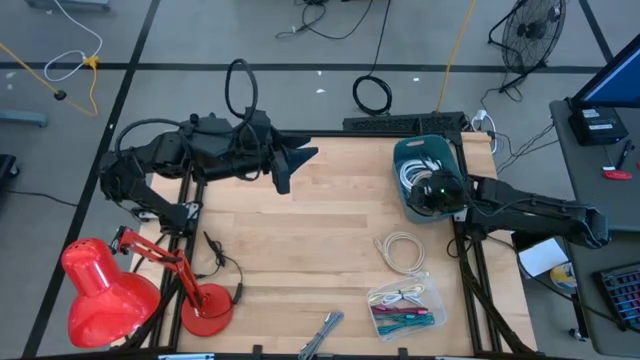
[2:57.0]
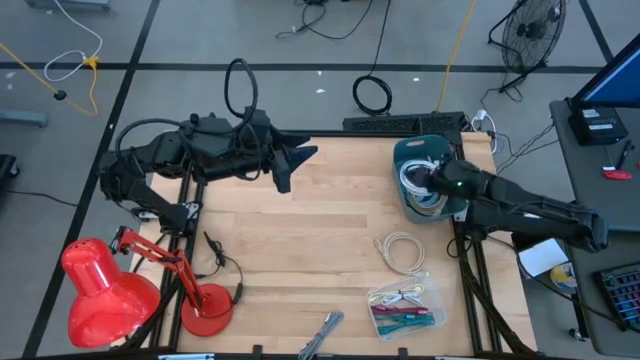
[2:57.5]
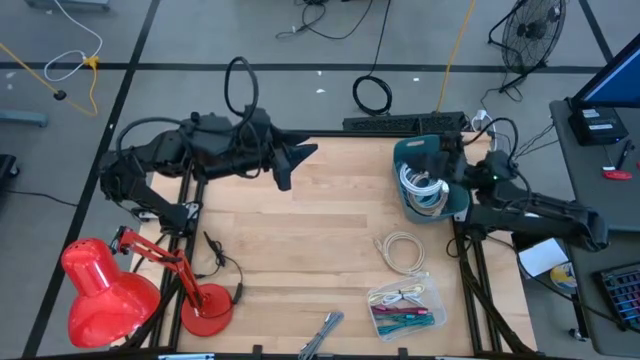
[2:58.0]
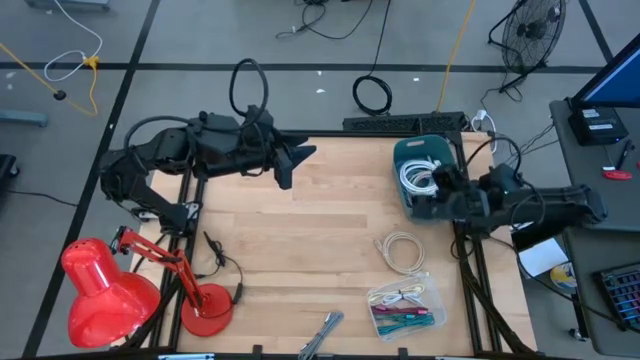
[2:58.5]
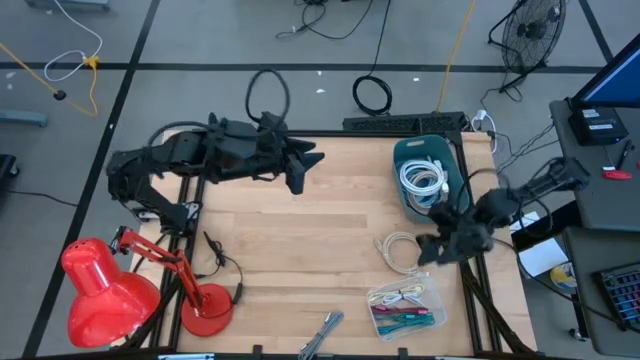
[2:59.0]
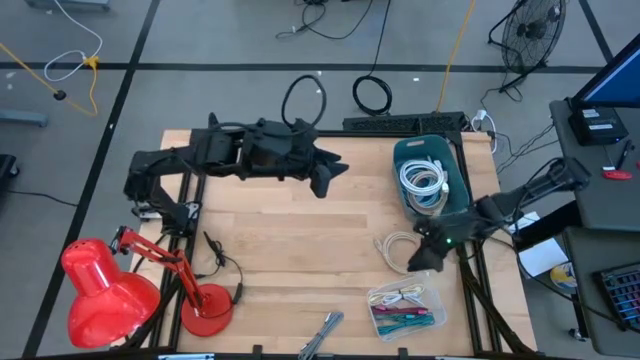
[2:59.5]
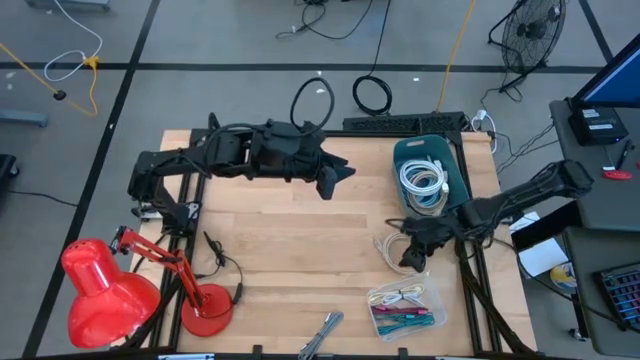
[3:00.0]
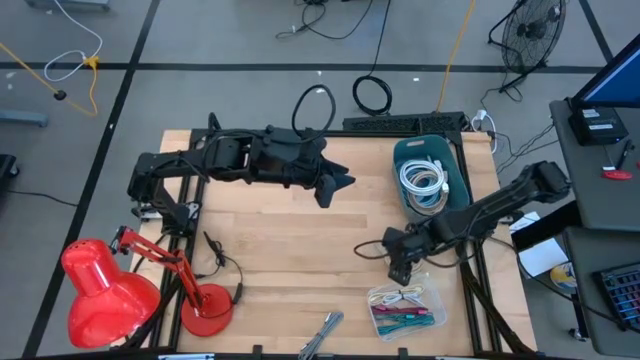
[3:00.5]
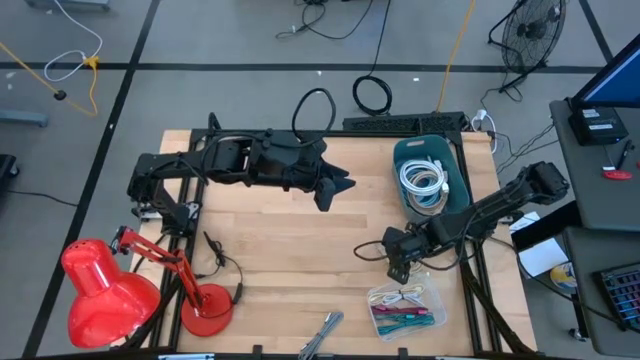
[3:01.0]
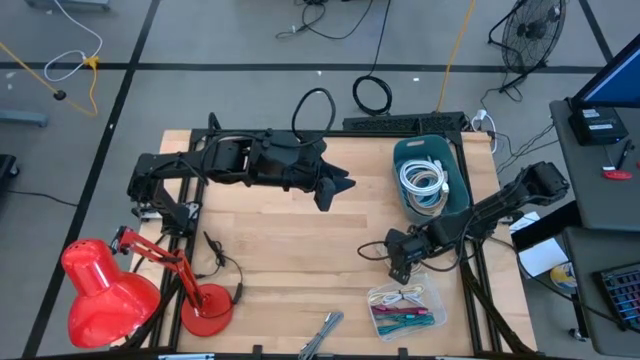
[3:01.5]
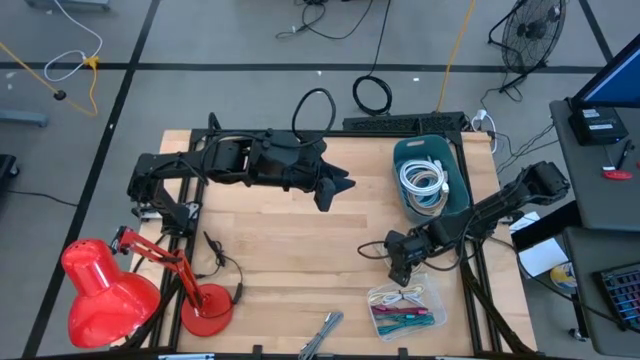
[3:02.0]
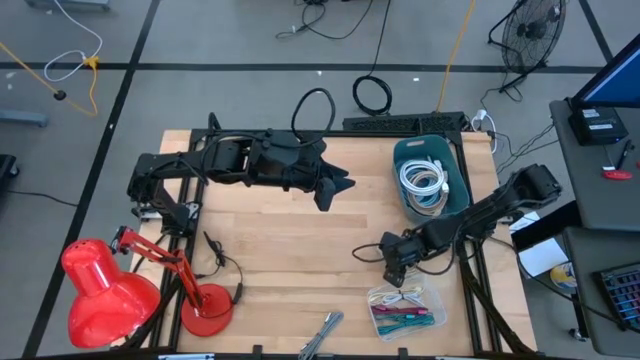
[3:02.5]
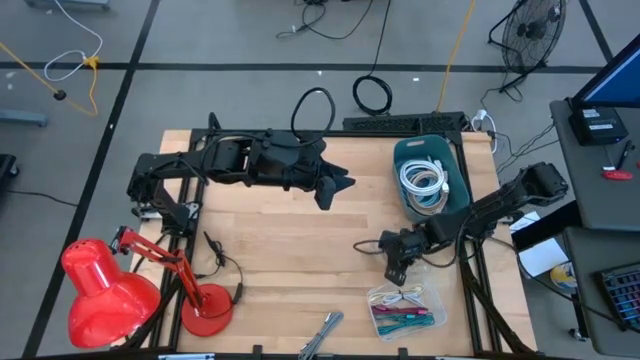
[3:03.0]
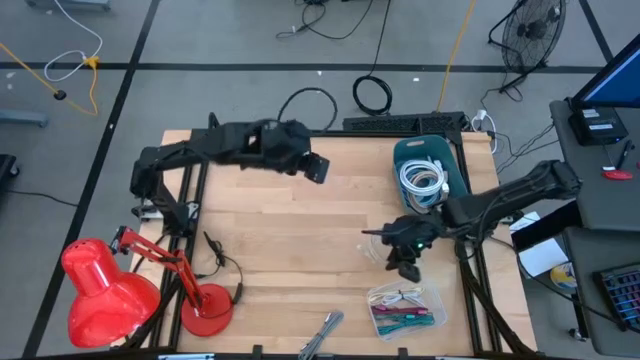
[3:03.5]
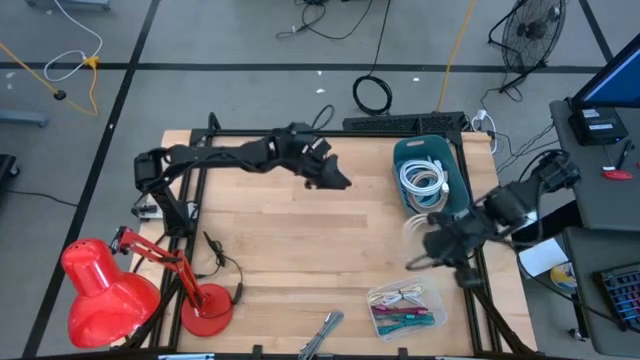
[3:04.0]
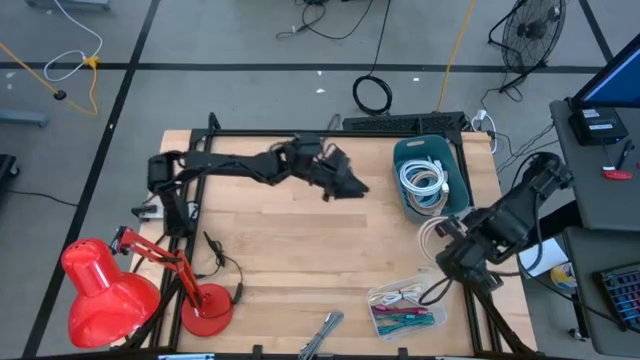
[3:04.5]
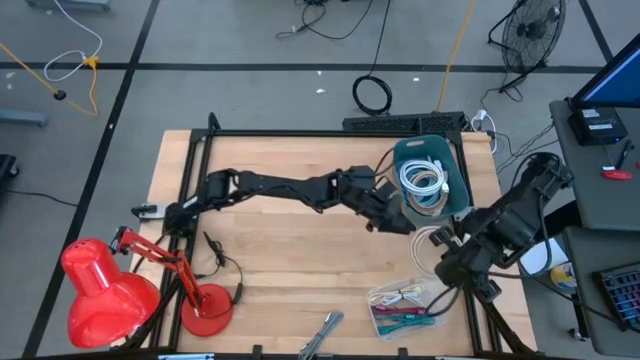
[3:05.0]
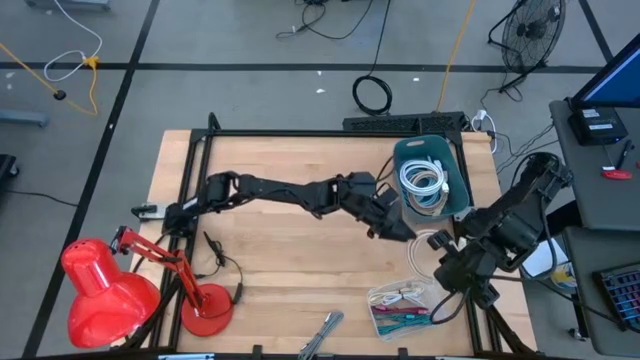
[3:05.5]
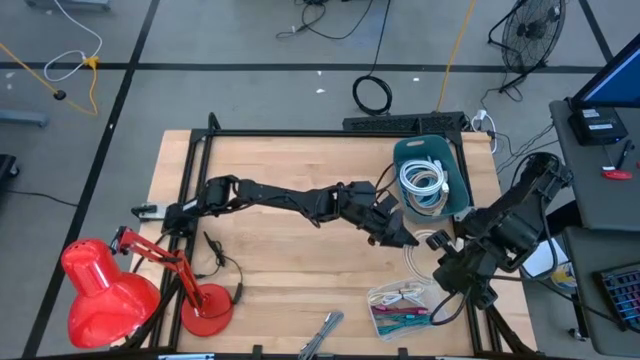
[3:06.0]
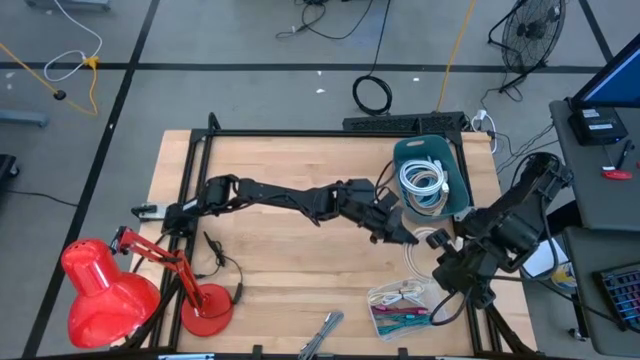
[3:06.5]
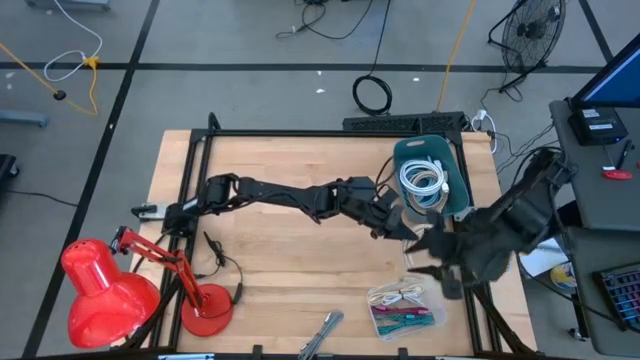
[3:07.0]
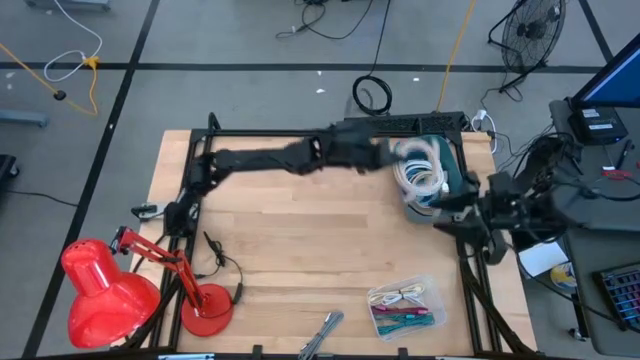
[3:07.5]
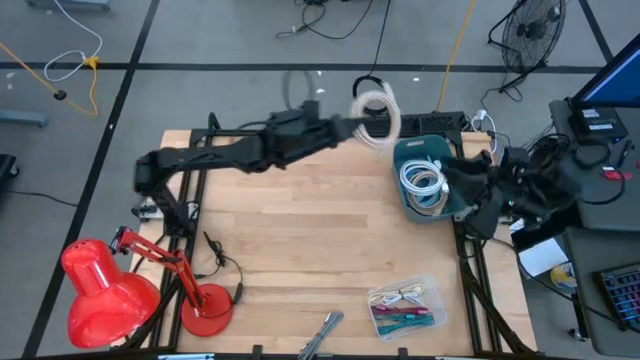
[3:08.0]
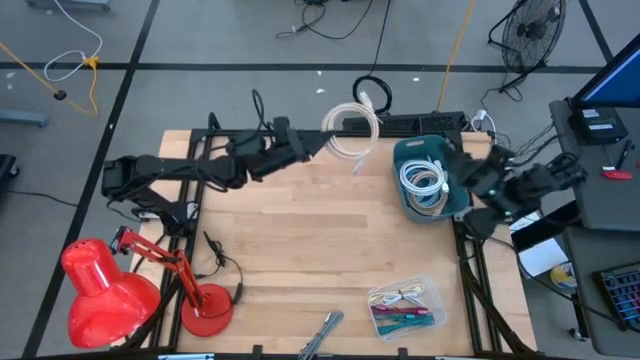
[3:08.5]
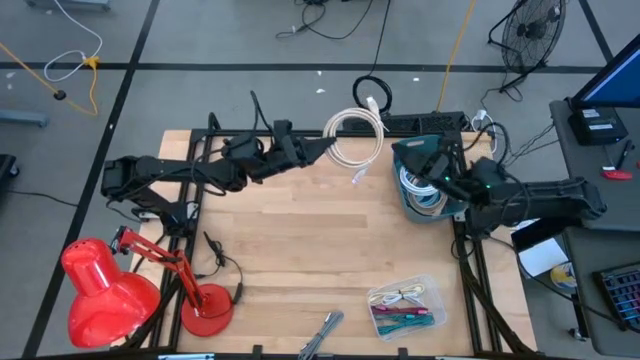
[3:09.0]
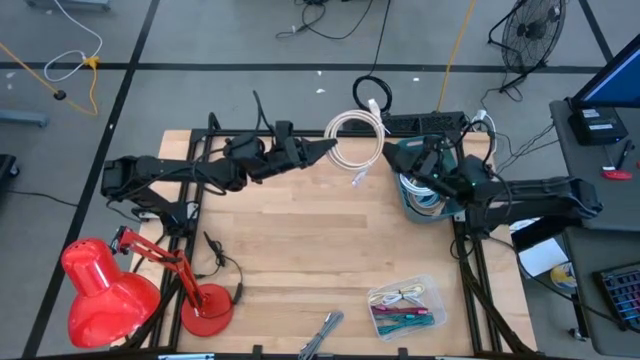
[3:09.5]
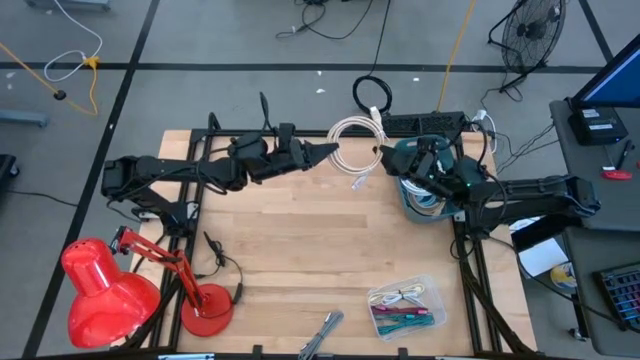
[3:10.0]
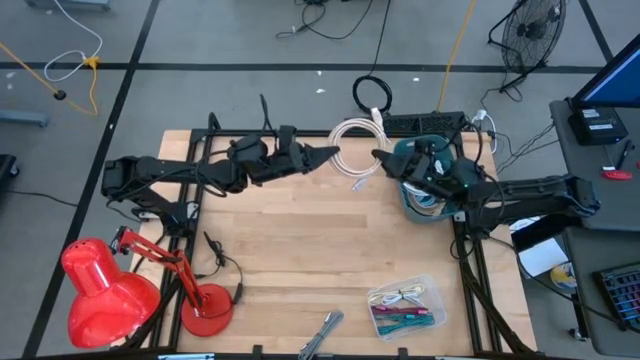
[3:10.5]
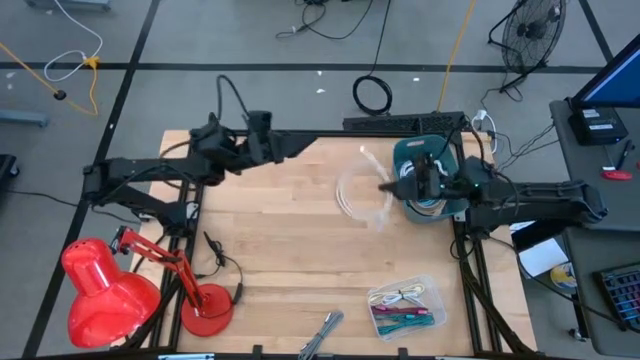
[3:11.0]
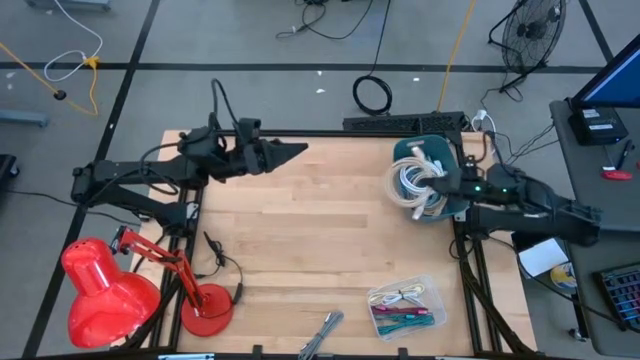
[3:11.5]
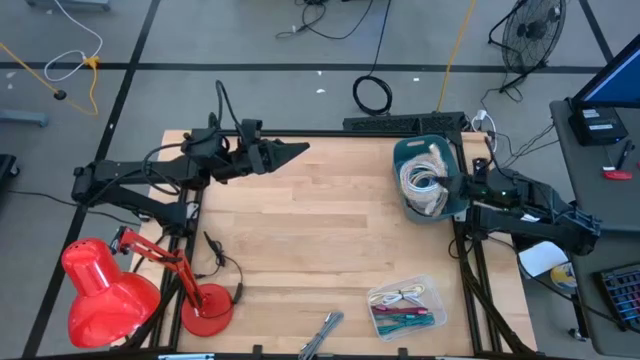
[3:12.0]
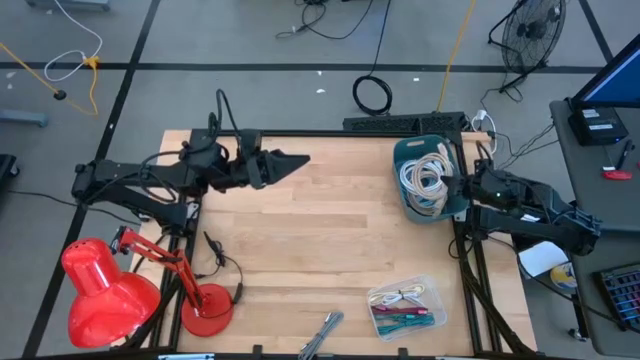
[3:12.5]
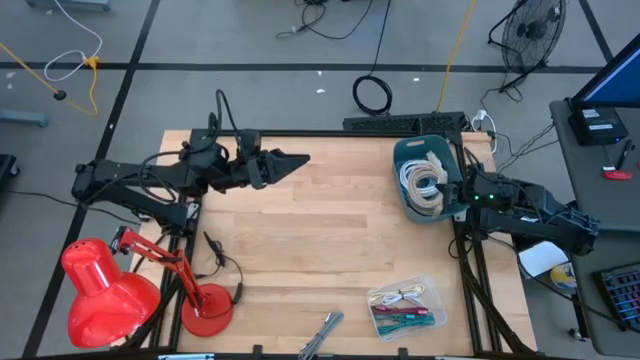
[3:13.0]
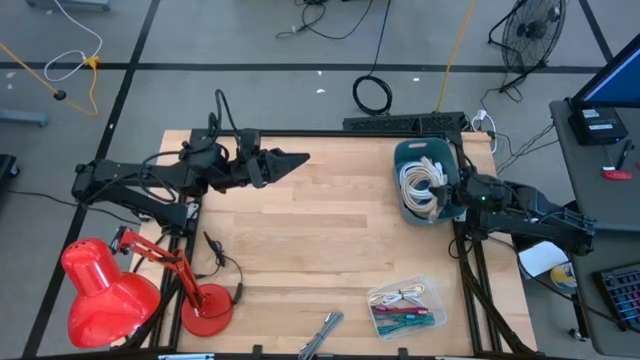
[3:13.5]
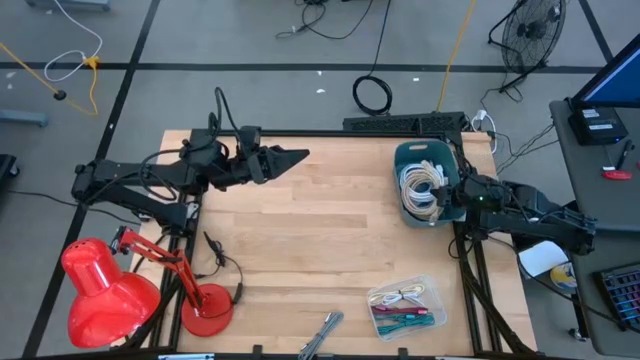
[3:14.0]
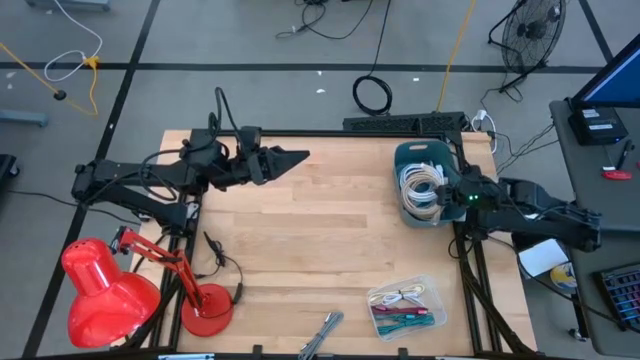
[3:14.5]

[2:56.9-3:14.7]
Task: Pick & Place USB Port
Put the light brown hdmi cable into the blue bin

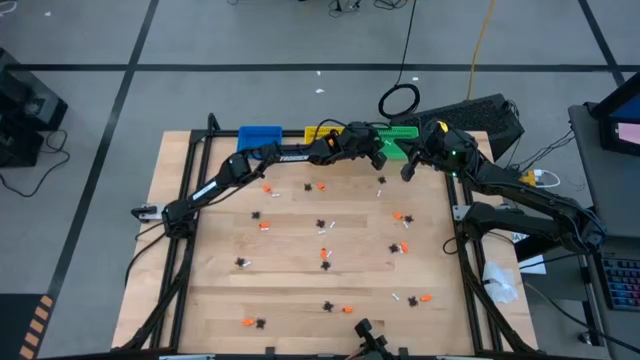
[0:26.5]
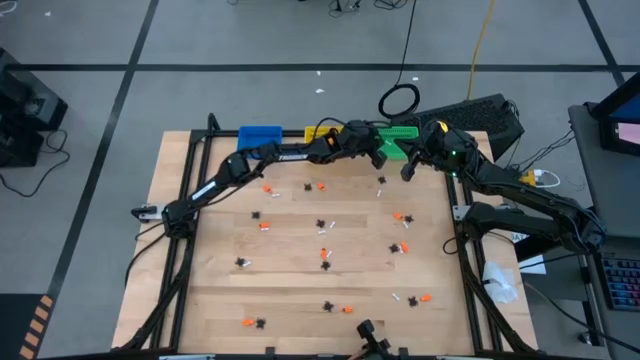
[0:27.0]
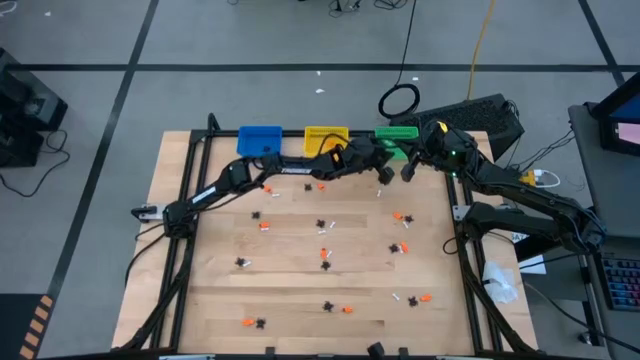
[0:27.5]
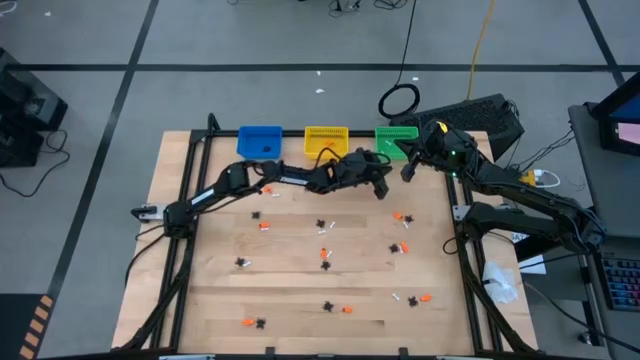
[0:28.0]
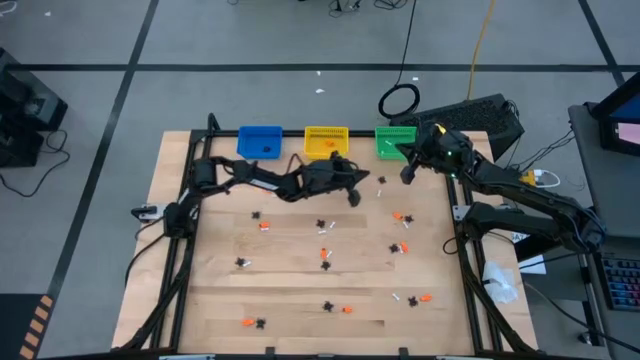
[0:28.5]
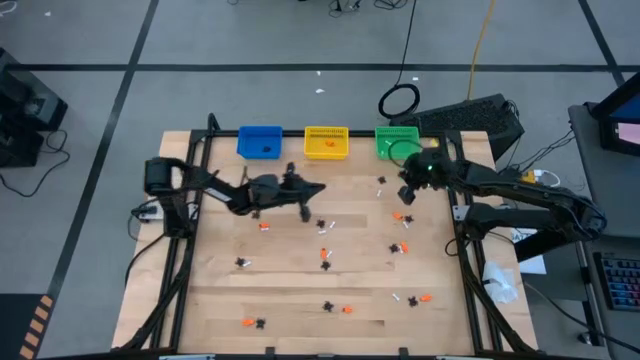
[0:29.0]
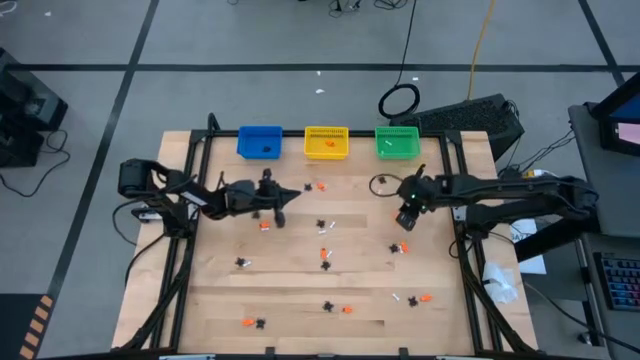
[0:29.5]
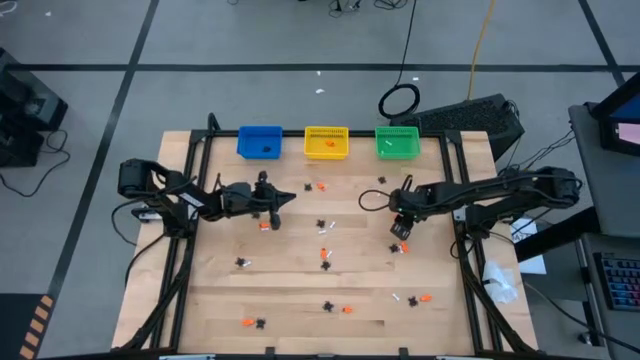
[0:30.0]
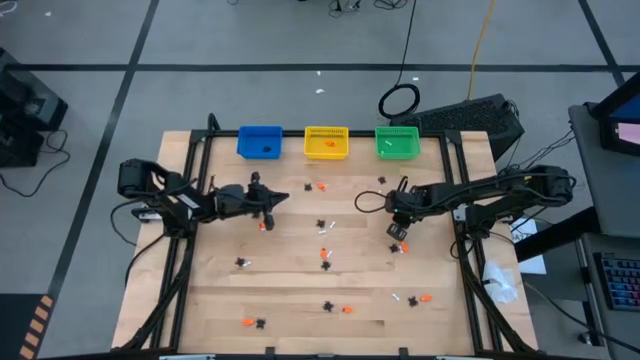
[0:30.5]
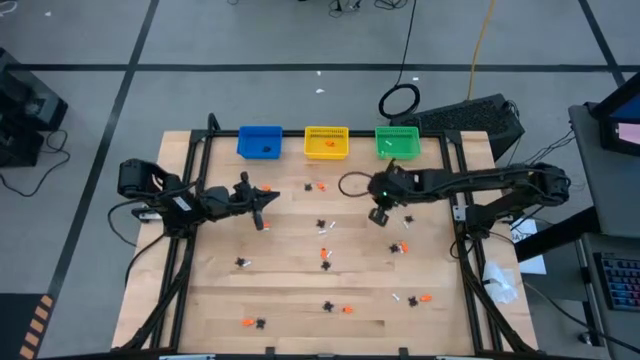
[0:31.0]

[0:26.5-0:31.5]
Task: Sort Halloween decoration
Put the orange skeleton toy into the yellow bin
